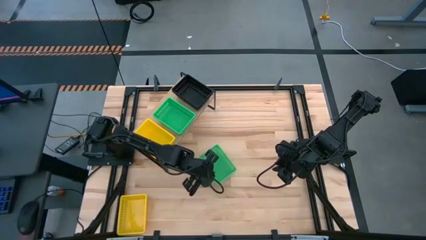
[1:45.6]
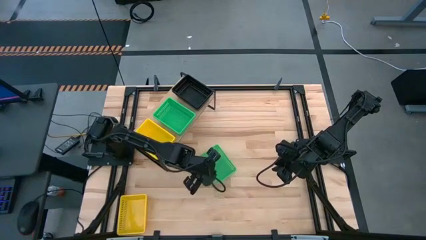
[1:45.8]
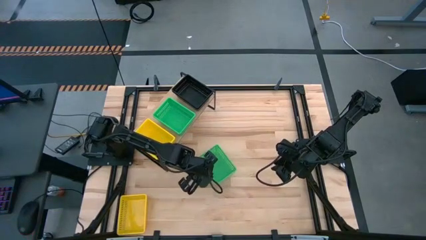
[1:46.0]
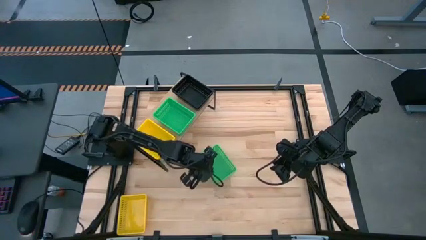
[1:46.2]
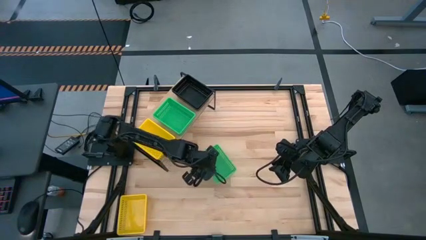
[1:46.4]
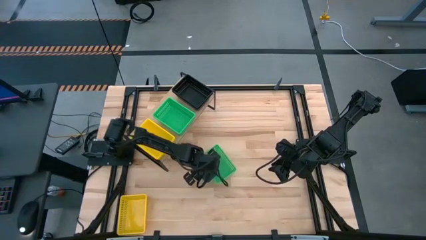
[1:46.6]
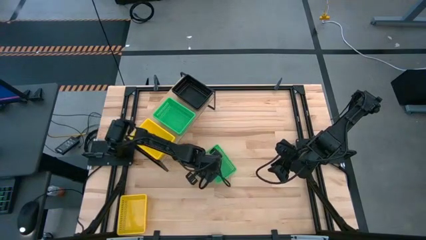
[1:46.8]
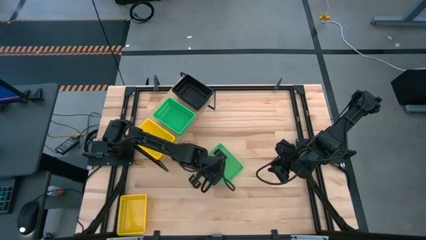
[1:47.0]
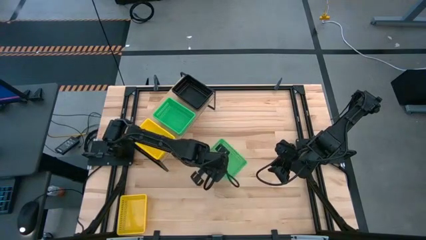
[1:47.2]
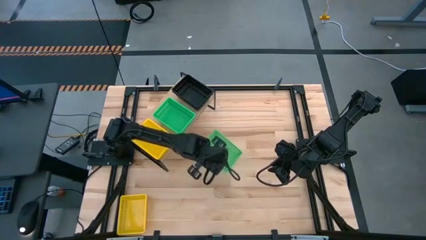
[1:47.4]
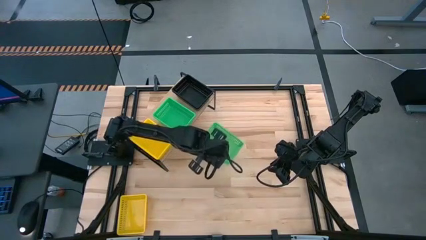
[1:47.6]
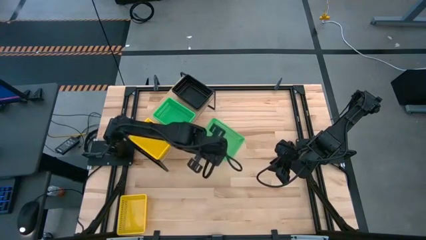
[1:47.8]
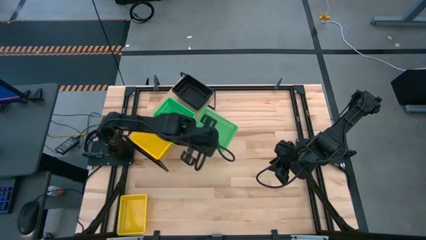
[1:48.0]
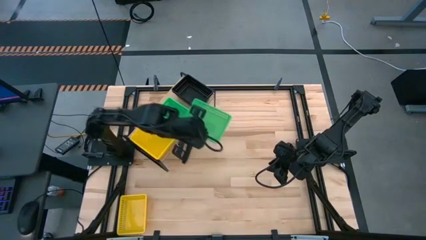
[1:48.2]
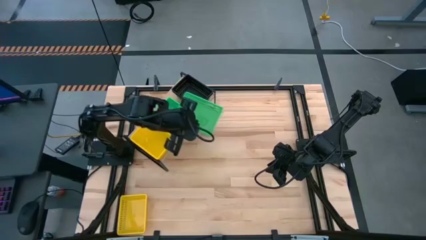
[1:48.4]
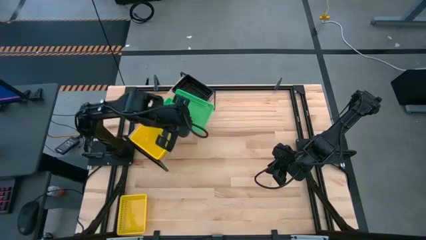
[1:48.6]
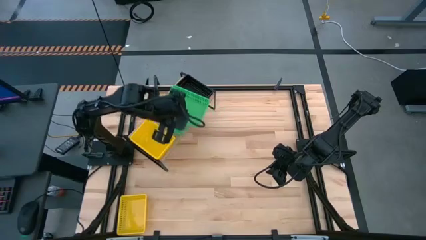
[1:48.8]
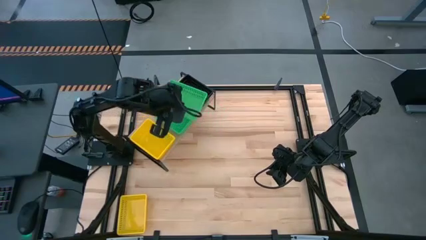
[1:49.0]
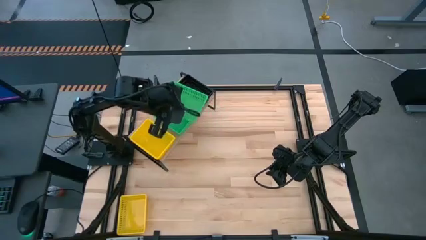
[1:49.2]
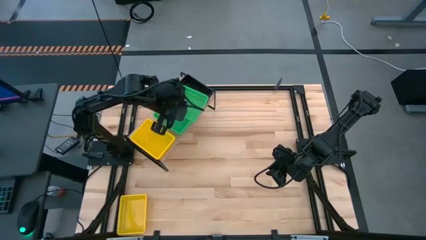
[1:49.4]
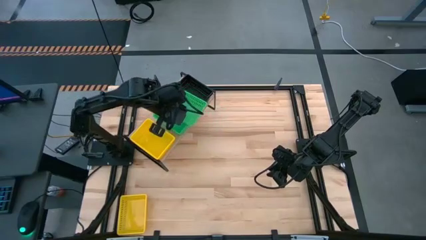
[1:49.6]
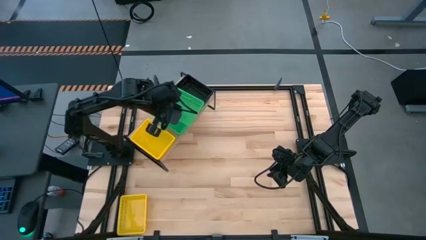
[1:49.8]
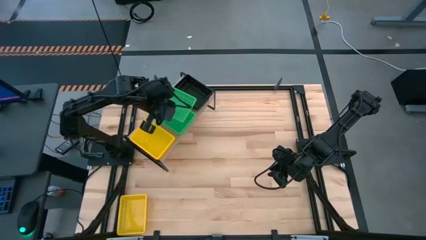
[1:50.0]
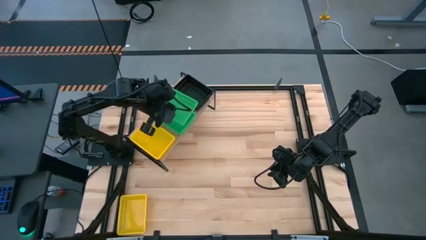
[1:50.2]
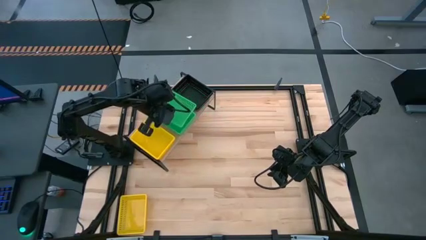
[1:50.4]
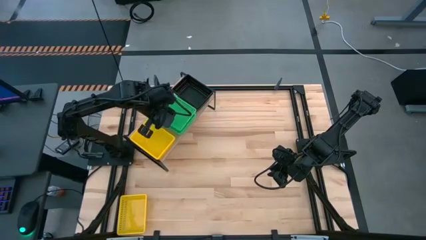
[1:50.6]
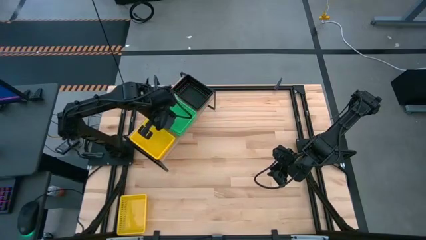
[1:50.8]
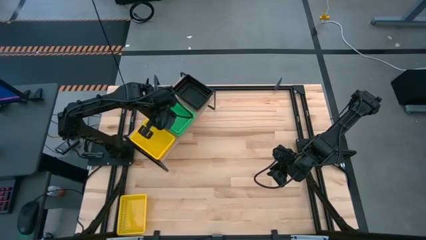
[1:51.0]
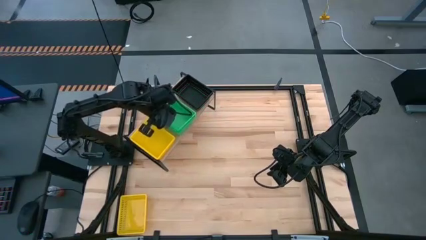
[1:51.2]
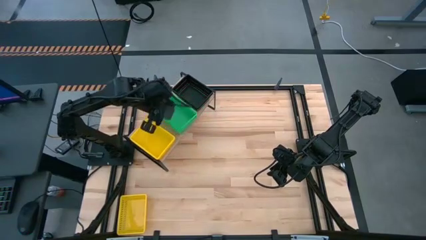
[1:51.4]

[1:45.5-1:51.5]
Task: Stack baskets on shelf by color
Stack the green bin on top of the other green bins on the shelf

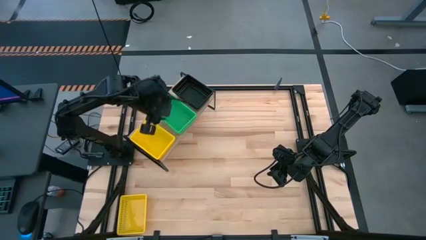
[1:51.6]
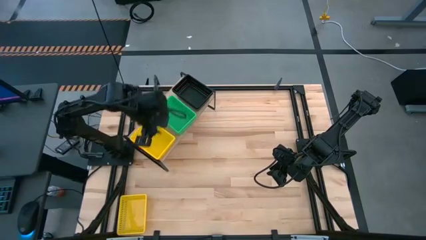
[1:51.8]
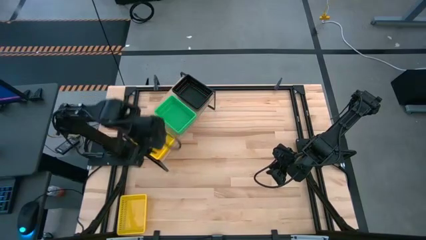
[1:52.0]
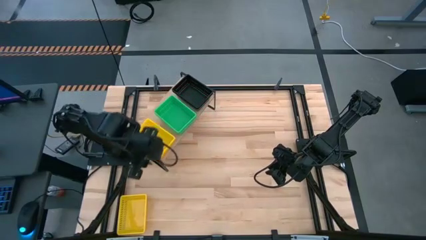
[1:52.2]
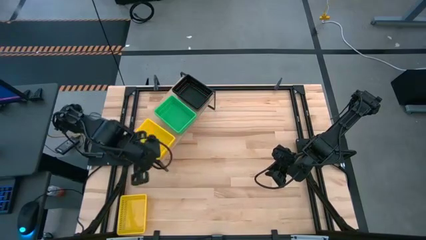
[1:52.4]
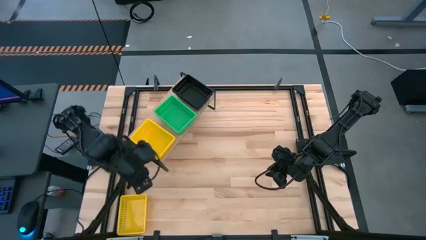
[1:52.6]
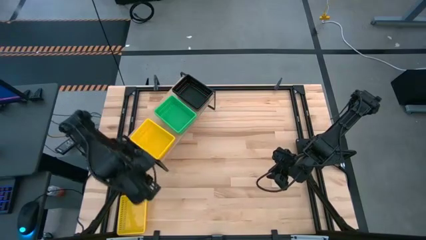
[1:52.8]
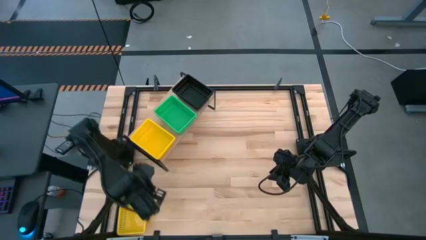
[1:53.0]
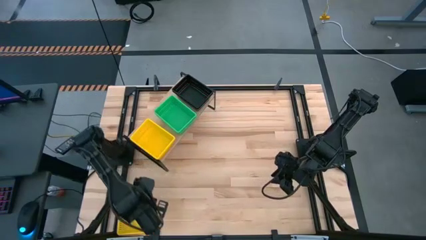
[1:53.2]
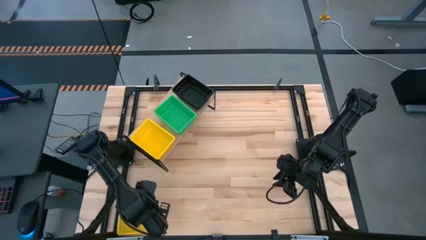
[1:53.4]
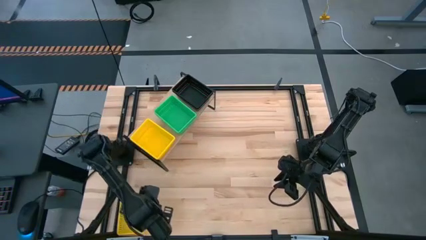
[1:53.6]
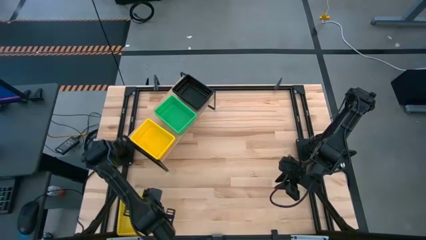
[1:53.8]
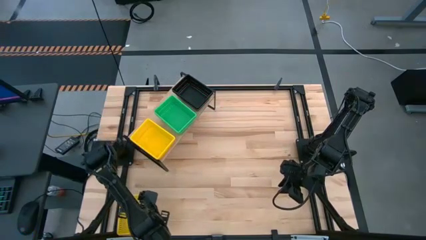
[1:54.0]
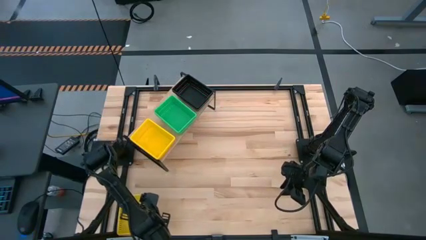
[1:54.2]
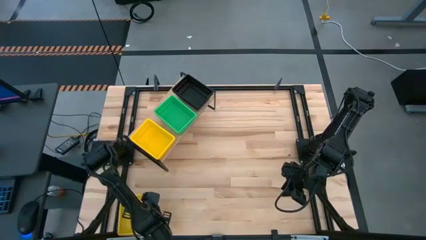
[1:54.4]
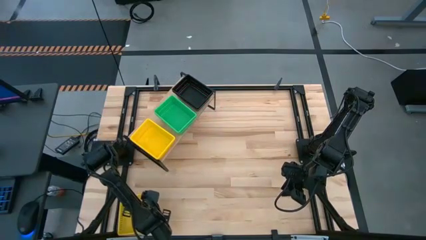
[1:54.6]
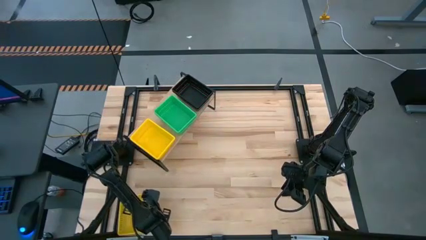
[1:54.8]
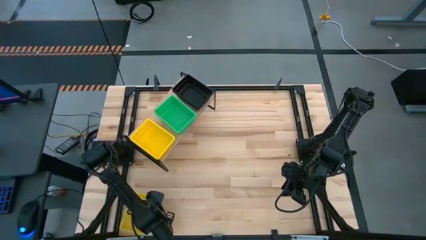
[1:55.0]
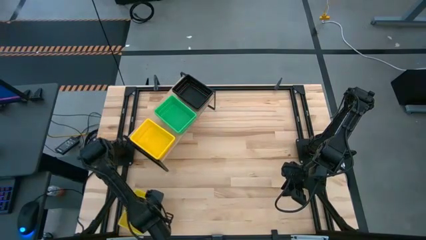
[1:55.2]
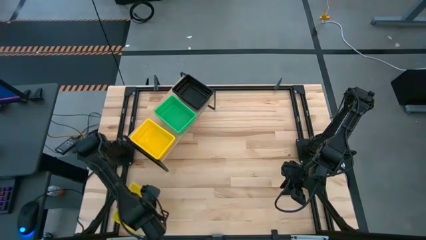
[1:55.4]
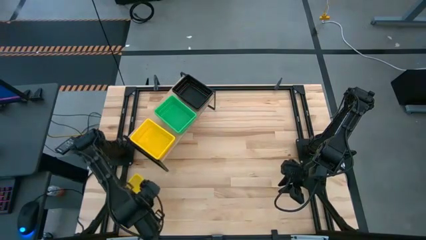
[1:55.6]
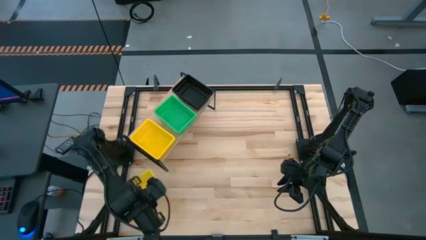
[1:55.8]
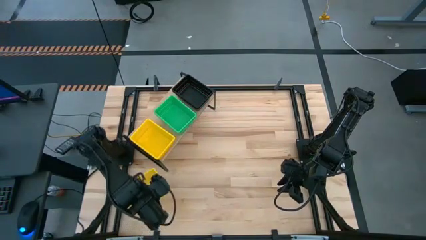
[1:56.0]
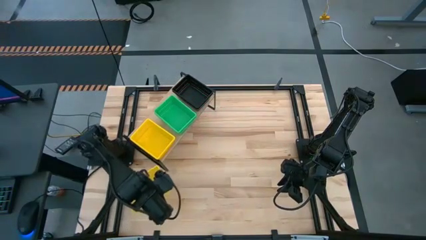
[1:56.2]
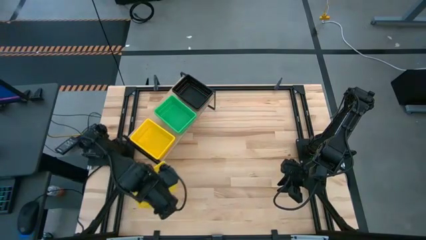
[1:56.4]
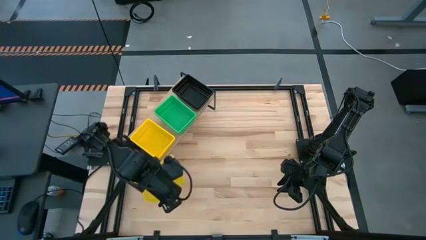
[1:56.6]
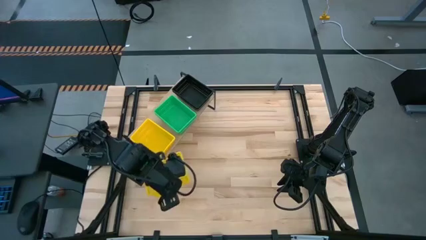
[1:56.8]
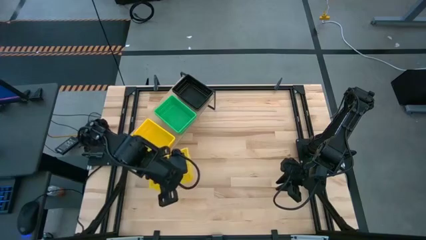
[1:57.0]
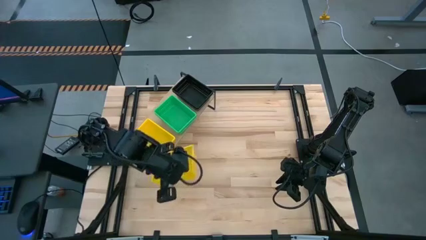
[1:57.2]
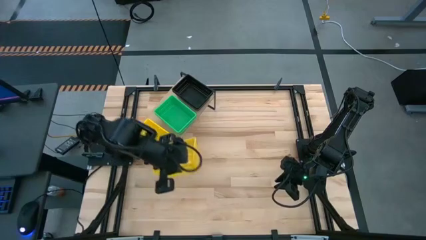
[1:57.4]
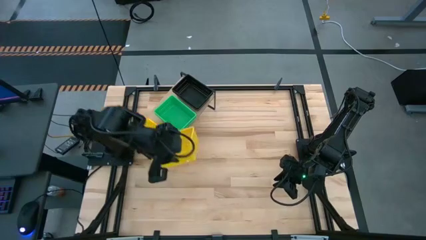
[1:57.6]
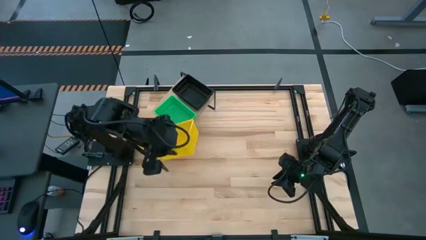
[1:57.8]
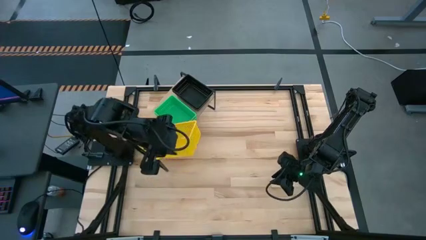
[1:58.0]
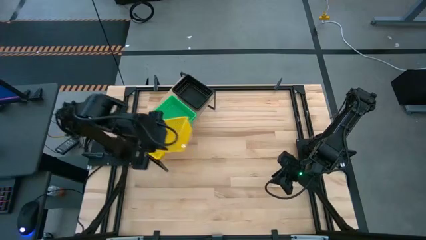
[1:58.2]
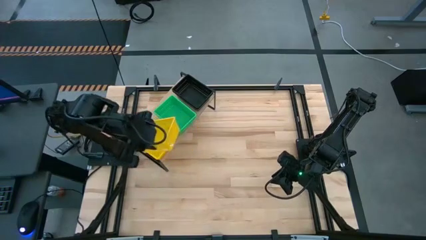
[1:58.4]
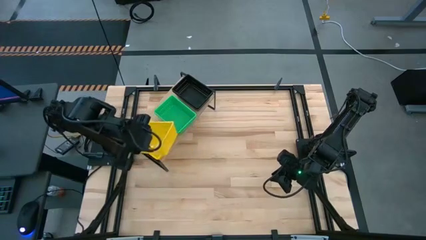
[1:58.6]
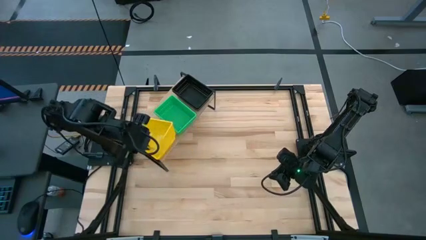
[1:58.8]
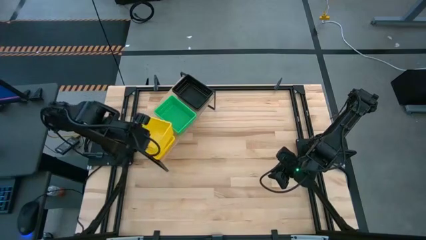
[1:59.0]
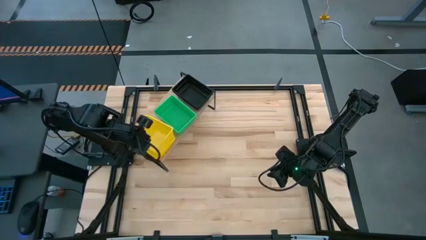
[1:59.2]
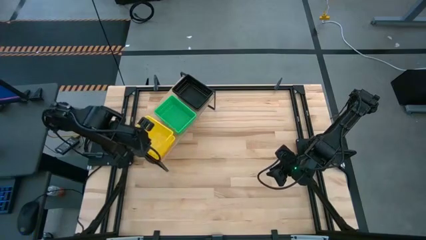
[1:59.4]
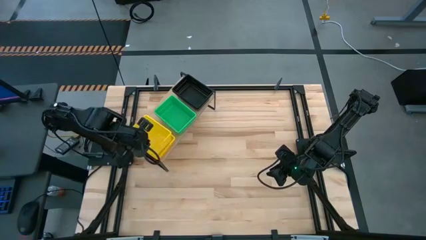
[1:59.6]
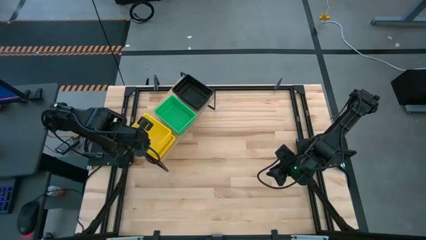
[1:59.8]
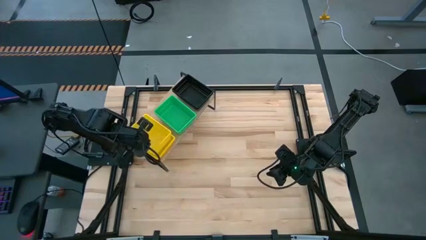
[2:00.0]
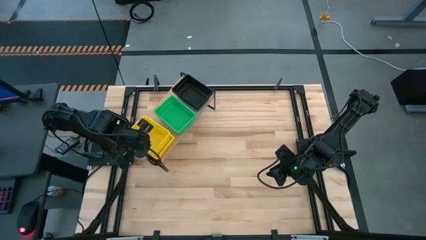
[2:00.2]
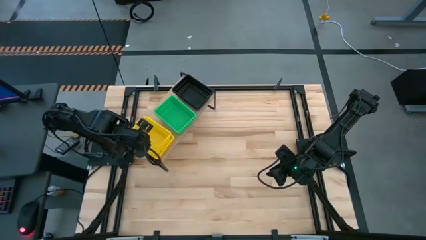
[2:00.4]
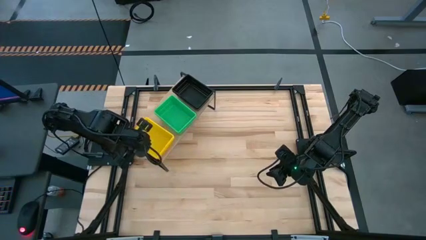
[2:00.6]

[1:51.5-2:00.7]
Stack the yellow bin on top of the other yellow bins on the shelf
